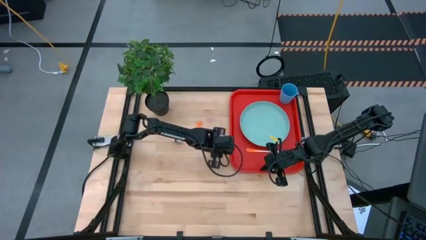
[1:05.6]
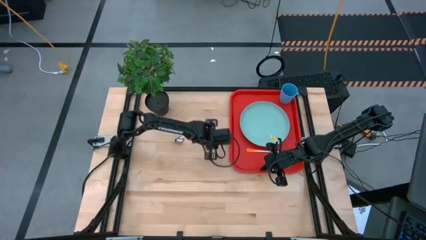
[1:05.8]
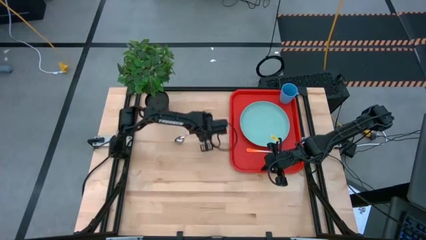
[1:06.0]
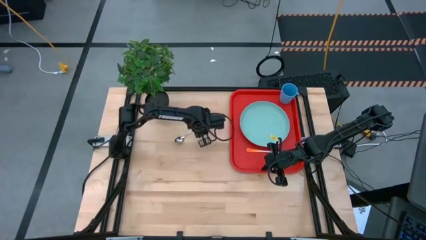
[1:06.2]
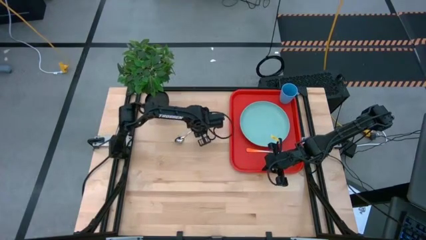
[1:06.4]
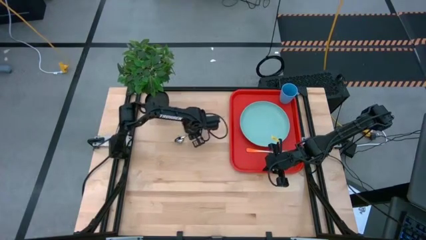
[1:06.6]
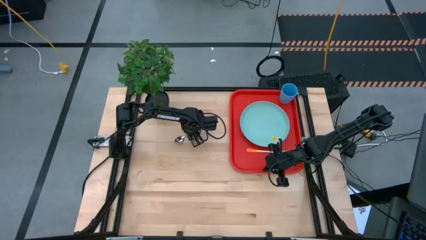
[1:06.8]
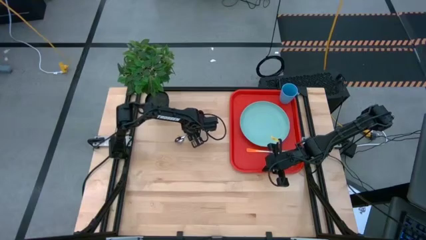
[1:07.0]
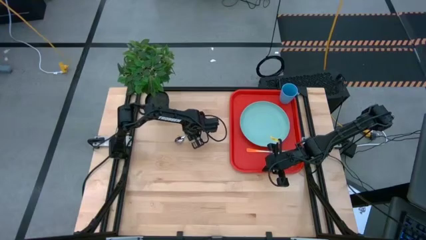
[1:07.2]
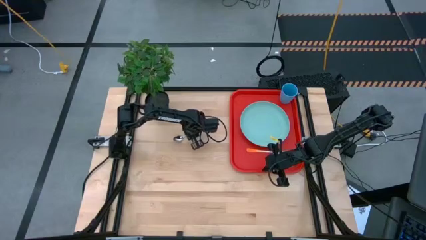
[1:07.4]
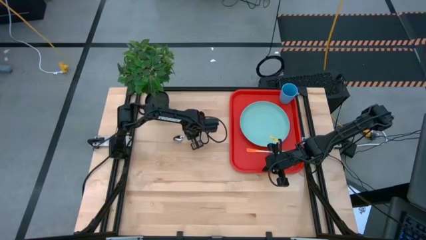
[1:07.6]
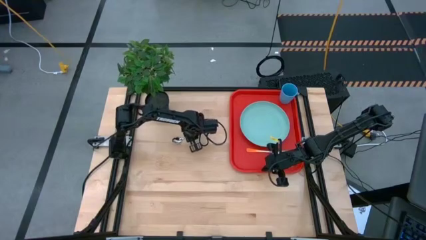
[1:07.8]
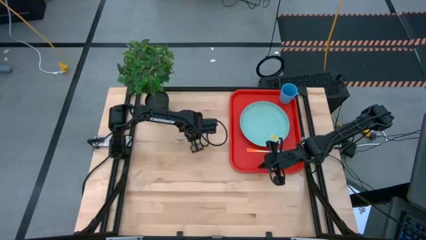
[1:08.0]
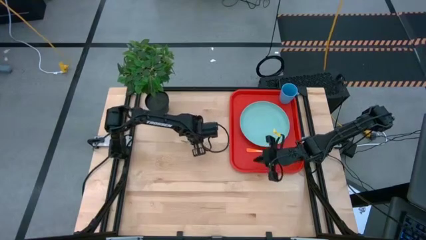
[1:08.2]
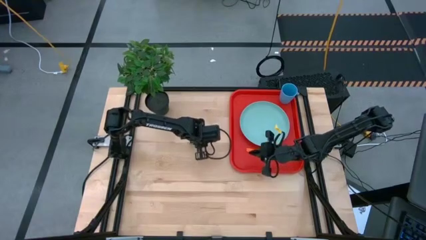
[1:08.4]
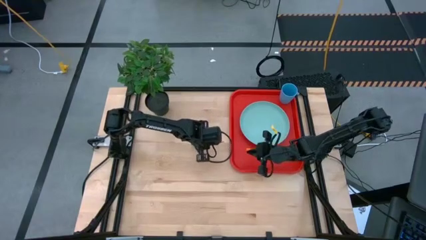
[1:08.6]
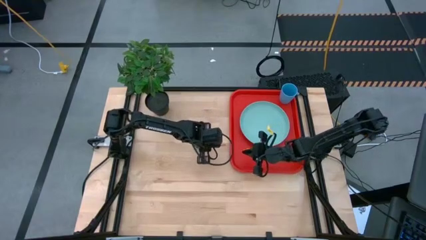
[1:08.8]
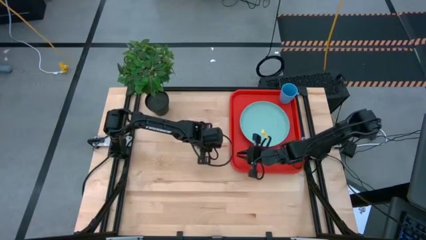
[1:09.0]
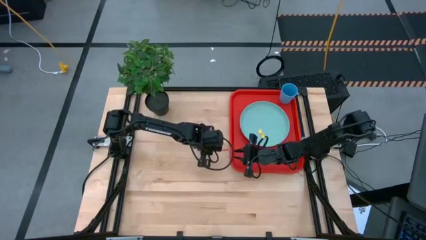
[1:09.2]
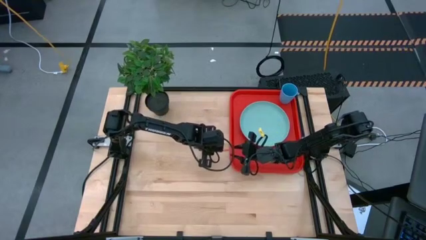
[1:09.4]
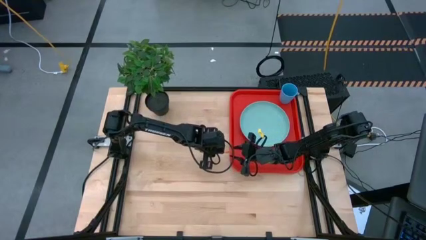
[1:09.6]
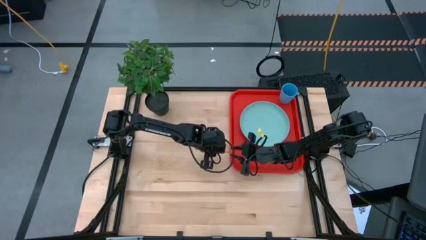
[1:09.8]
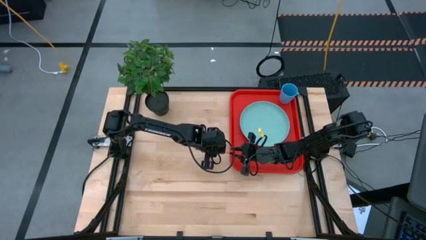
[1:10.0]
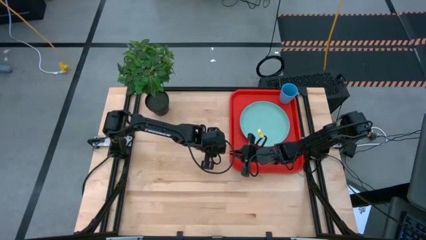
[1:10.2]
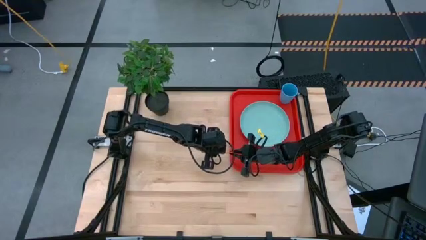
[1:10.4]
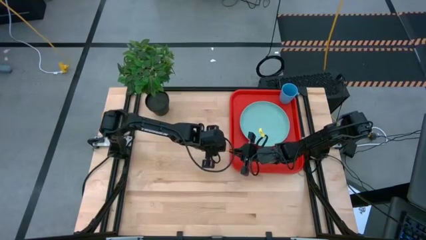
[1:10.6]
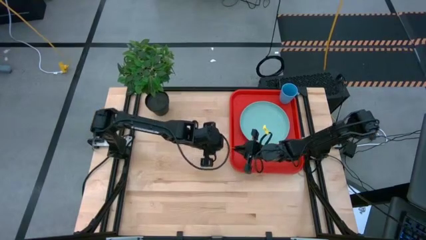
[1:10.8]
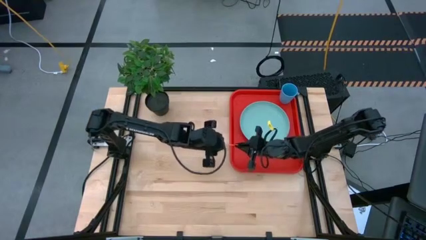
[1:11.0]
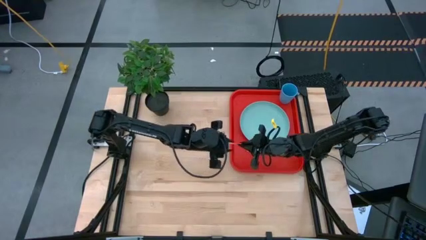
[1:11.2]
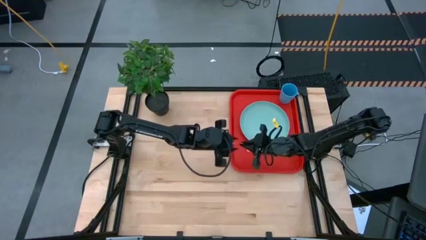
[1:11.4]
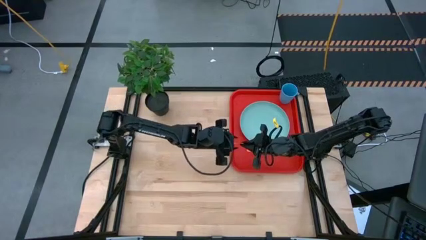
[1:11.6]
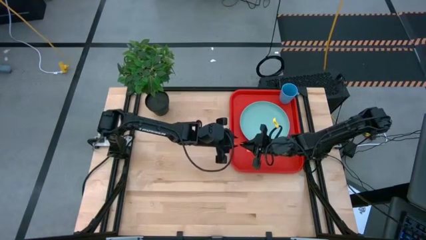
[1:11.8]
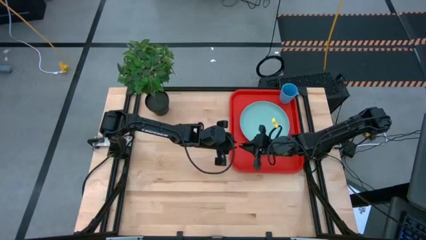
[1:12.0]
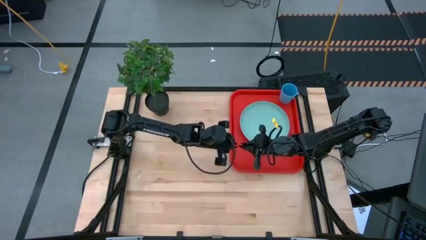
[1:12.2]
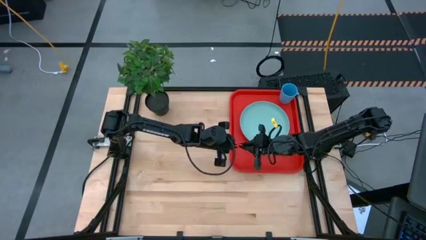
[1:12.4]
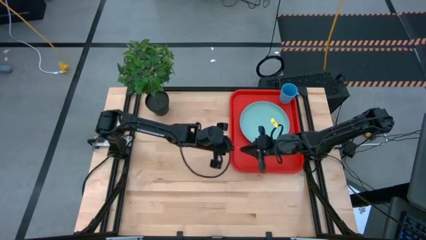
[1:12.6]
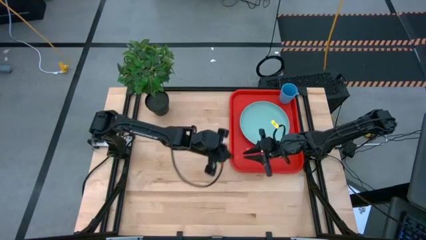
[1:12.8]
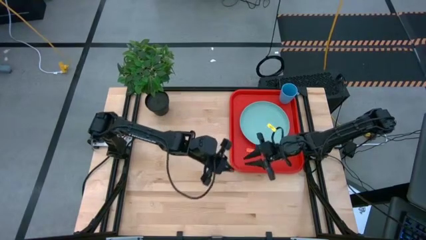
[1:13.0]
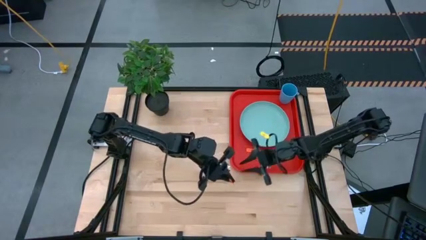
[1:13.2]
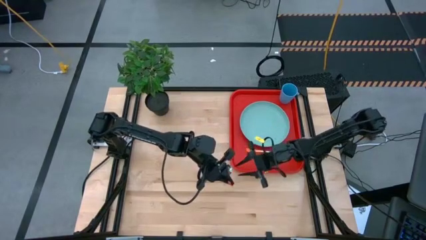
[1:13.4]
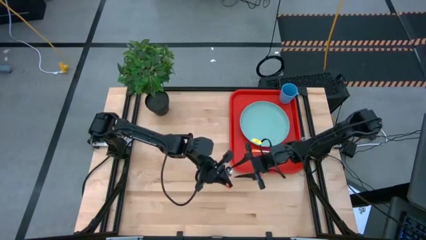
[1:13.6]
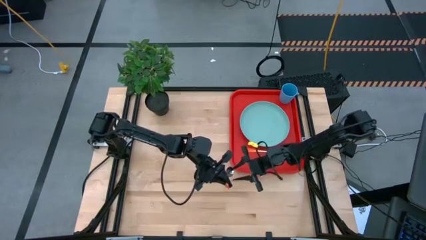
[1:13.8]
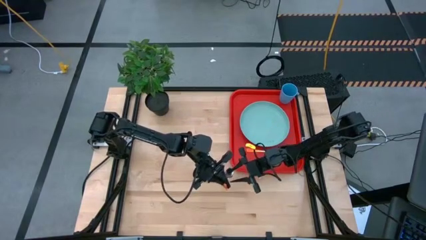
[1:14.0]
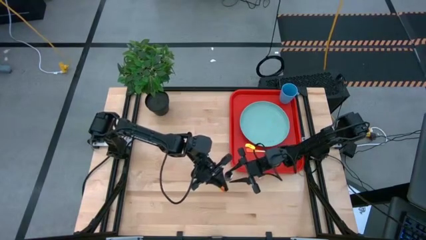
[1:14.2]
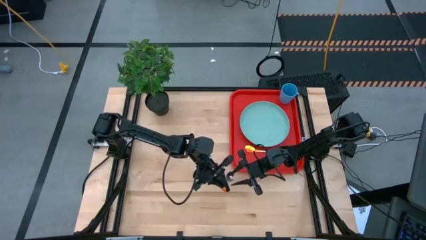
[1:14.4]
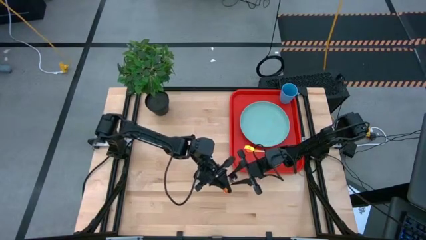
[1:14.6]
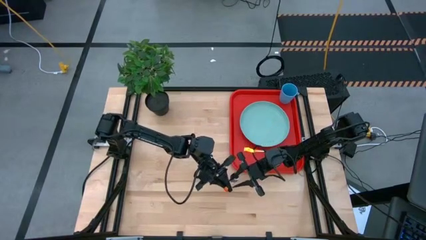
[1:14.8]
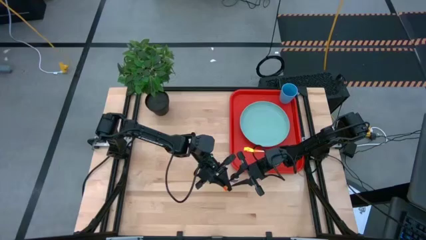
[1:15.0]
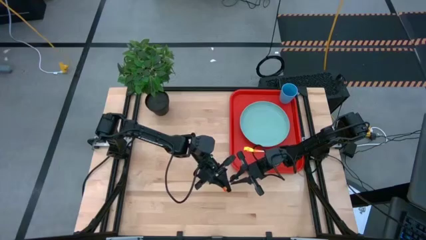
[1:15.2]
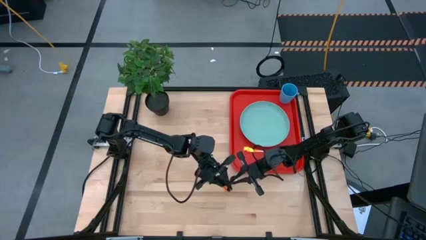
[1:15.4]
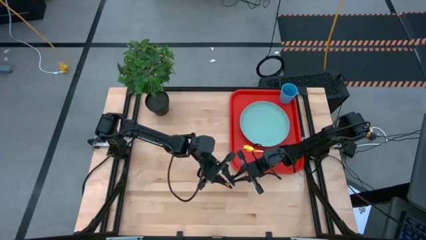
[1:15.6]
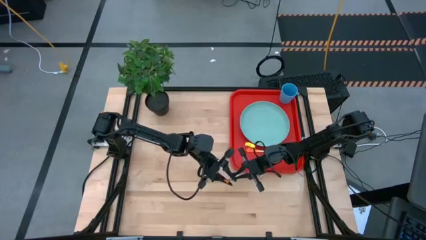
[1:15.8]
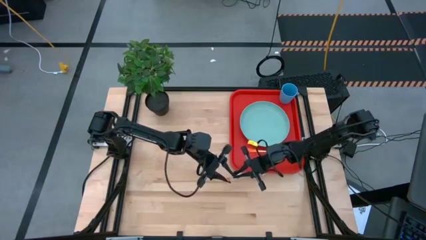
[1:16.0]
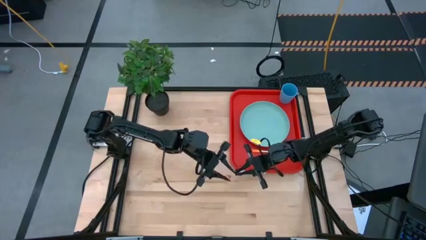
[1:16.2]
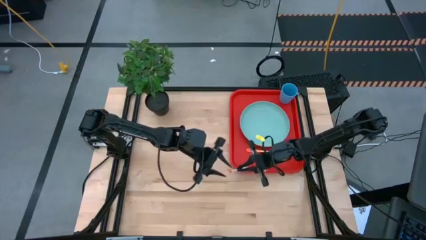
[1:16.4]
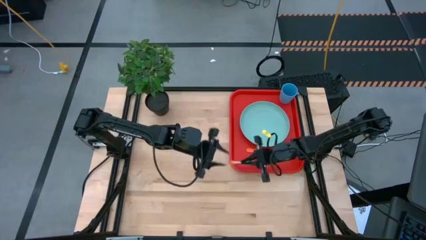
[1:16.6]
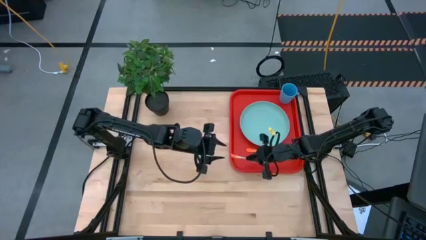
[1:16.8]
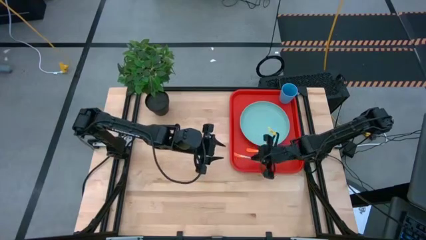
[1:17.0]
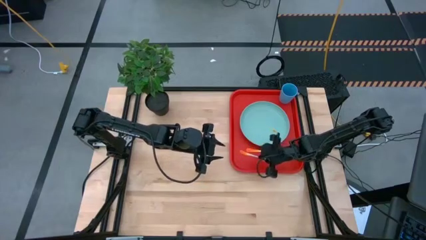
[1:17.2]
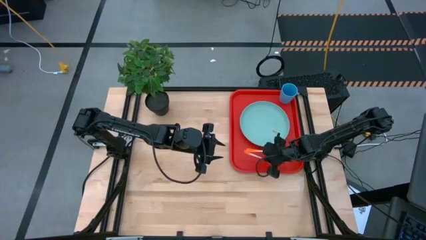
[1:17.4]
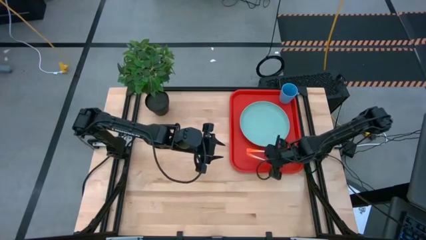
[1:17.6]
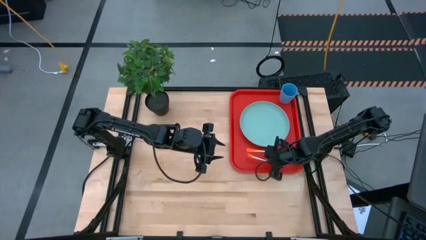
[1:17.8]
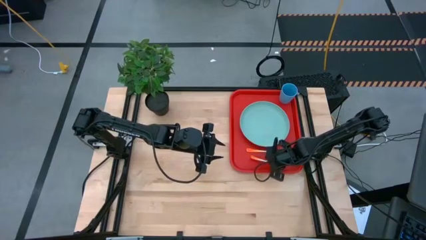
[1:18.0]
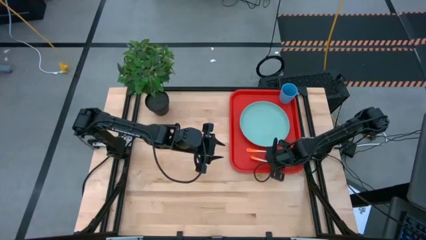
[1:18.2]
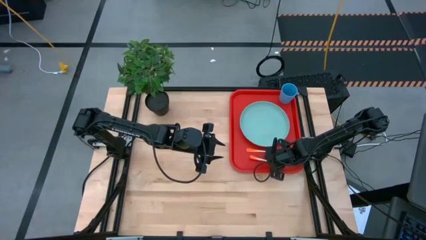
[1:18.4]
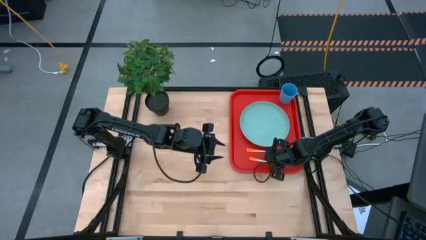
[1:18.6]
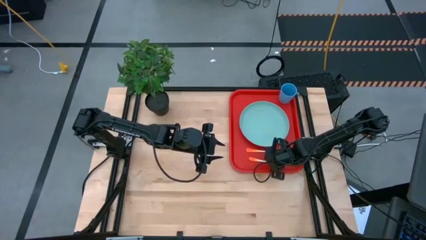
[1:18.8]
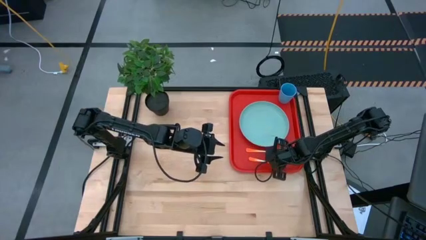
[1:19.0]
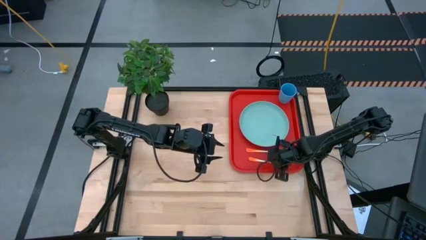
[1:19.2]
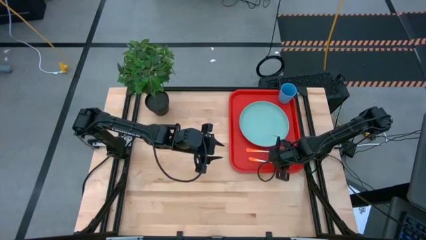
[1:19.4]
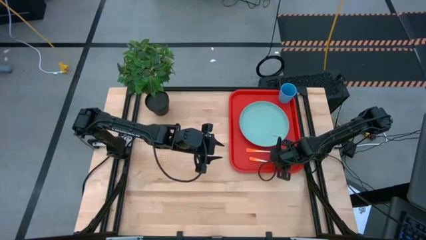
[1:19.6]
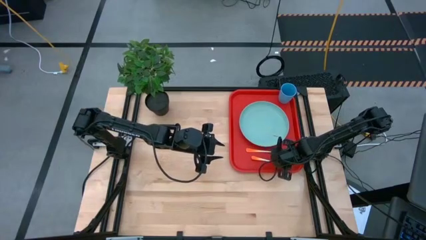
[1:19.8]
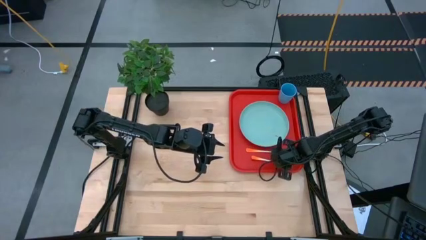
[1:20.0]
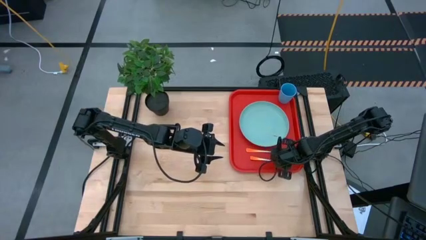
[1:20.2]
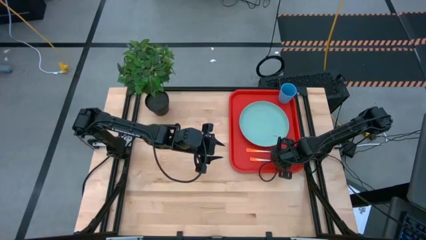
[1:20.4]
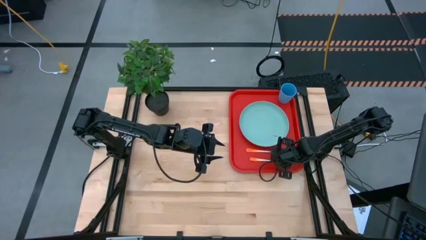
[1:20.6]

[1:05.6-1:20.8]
Task: Pick and place plate/cup/fork/spoon on tray
Put the orange spoon on the red tray at the bottom of the orange fork
